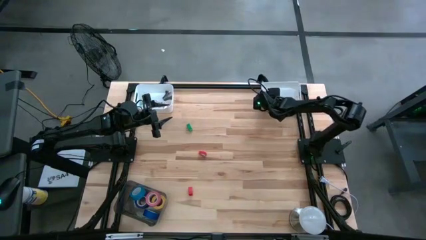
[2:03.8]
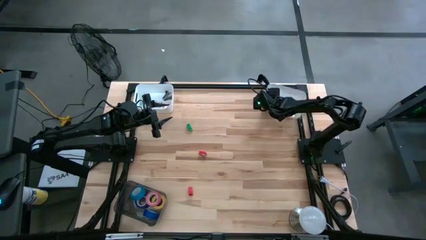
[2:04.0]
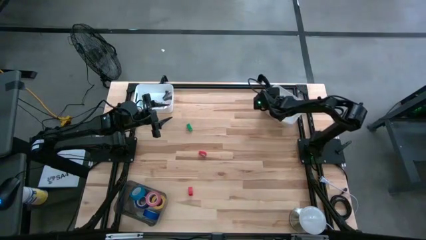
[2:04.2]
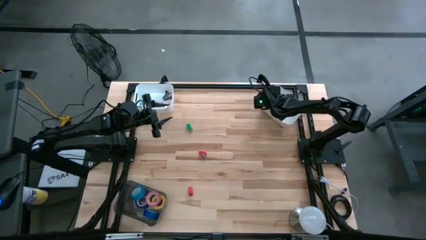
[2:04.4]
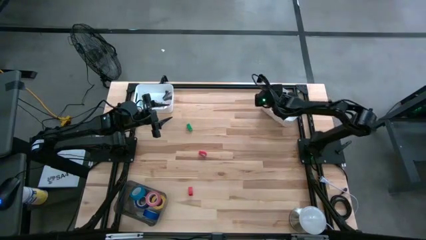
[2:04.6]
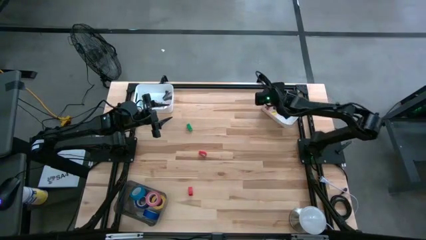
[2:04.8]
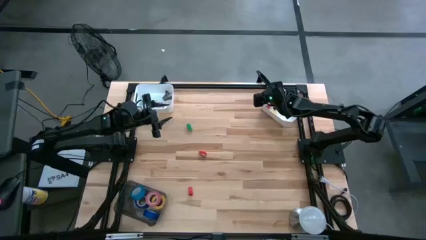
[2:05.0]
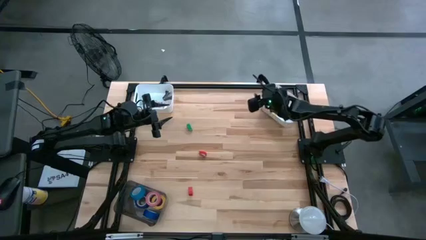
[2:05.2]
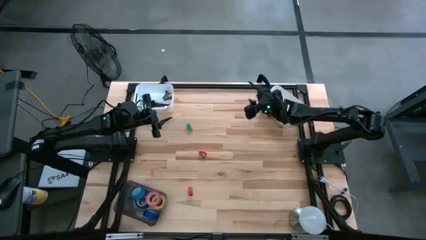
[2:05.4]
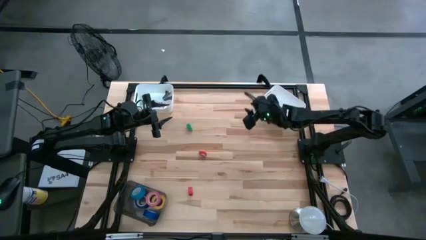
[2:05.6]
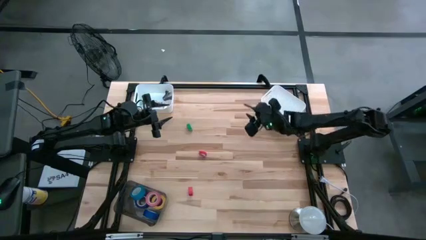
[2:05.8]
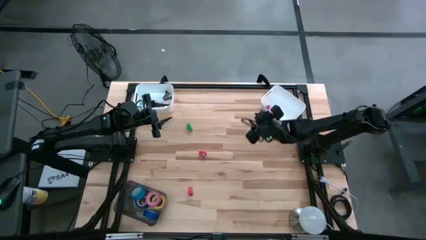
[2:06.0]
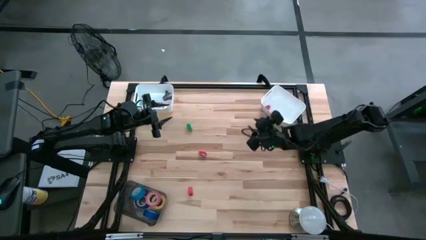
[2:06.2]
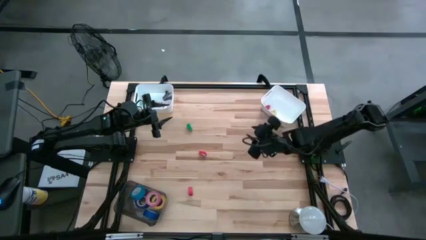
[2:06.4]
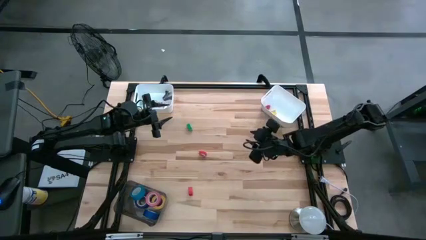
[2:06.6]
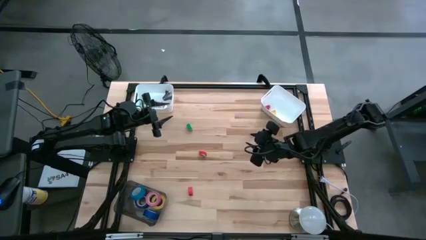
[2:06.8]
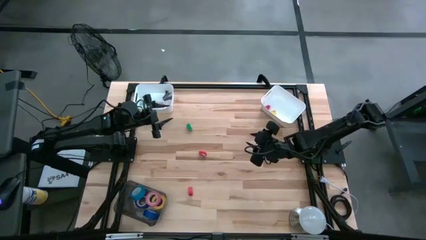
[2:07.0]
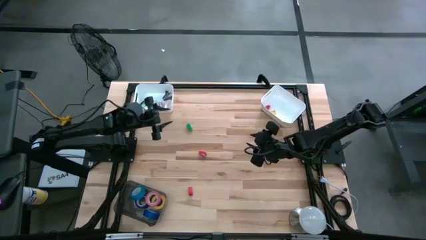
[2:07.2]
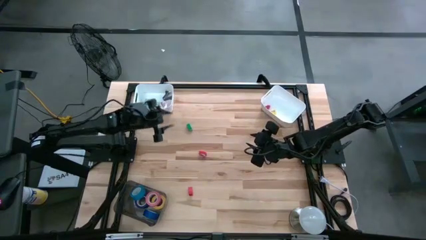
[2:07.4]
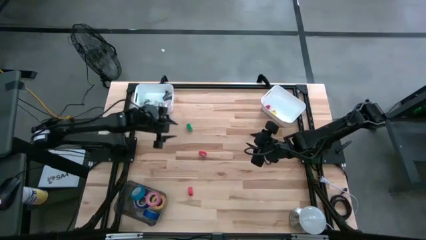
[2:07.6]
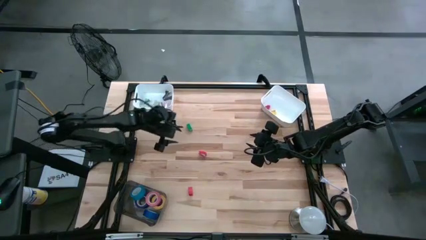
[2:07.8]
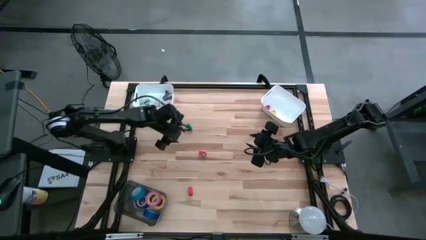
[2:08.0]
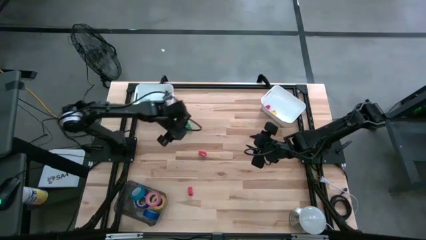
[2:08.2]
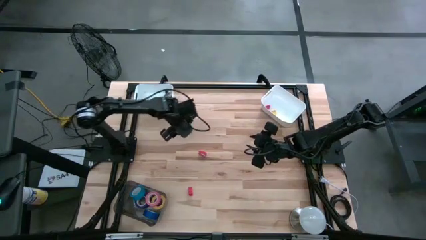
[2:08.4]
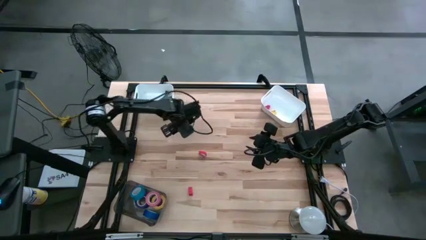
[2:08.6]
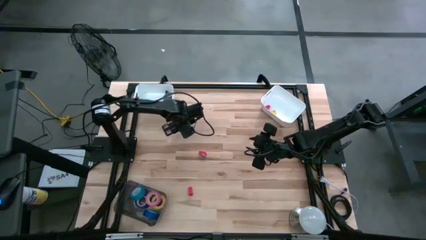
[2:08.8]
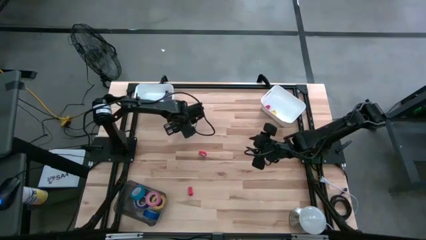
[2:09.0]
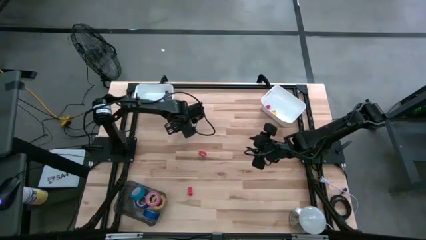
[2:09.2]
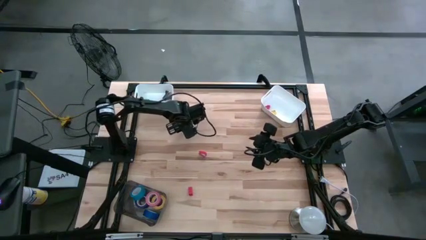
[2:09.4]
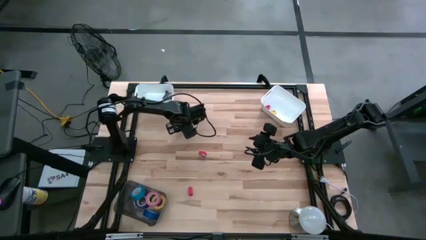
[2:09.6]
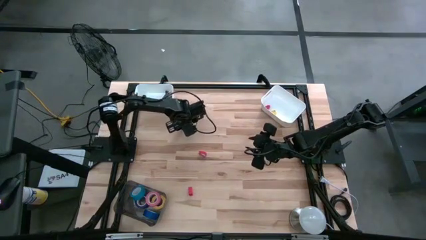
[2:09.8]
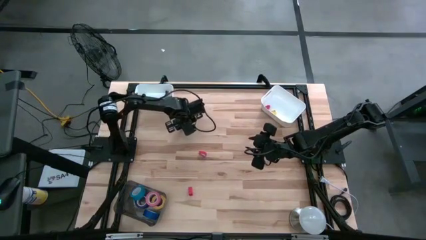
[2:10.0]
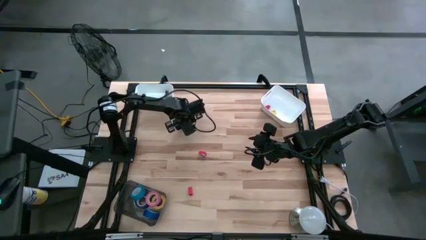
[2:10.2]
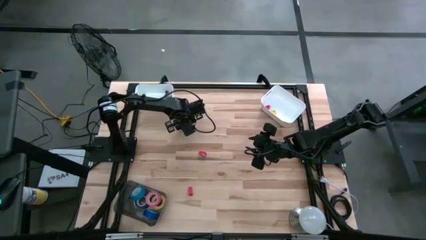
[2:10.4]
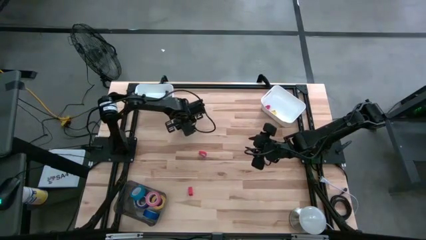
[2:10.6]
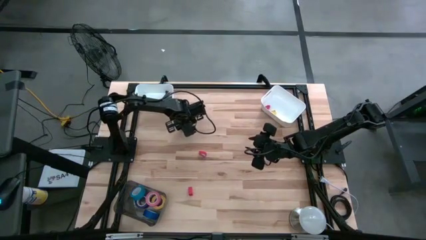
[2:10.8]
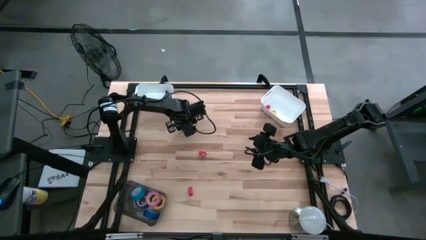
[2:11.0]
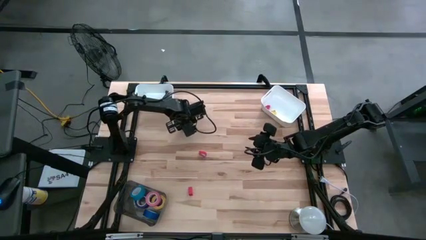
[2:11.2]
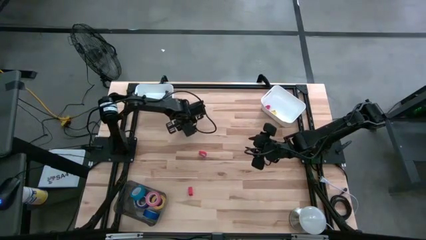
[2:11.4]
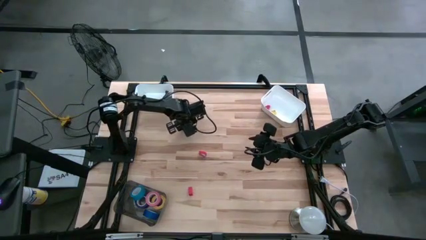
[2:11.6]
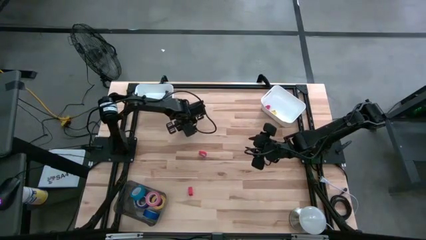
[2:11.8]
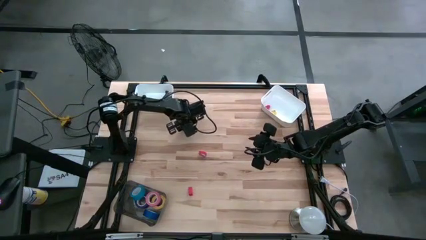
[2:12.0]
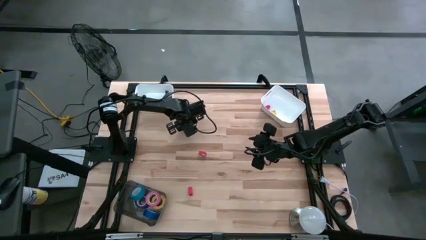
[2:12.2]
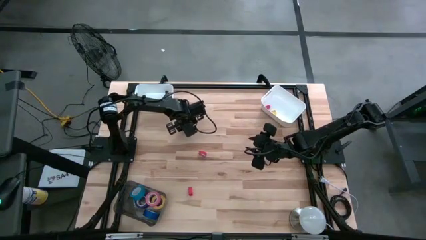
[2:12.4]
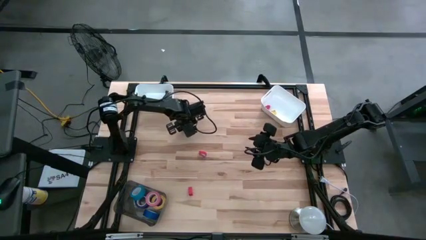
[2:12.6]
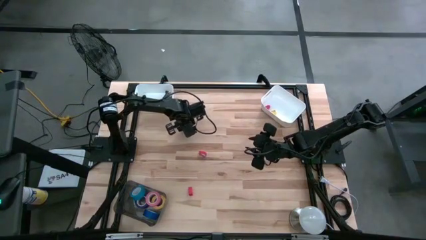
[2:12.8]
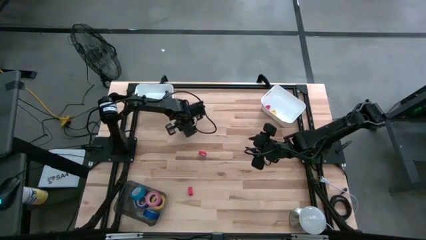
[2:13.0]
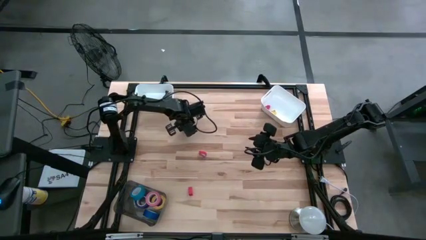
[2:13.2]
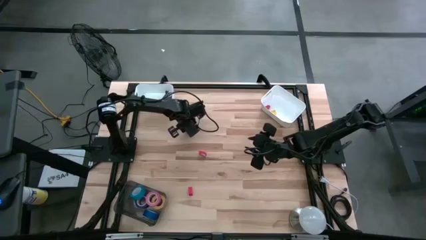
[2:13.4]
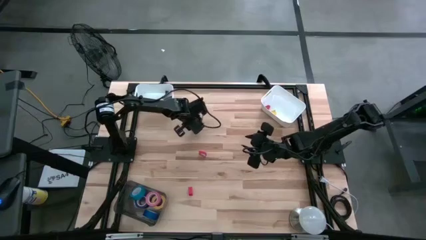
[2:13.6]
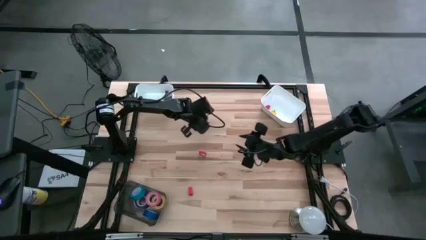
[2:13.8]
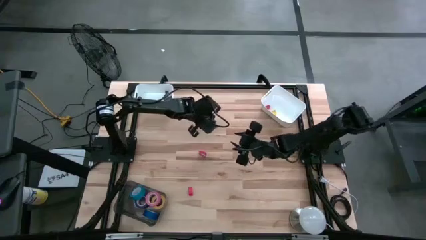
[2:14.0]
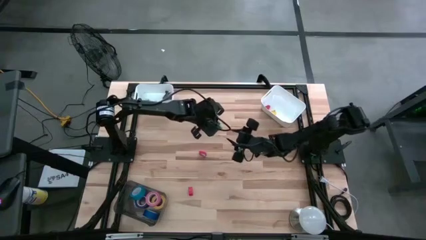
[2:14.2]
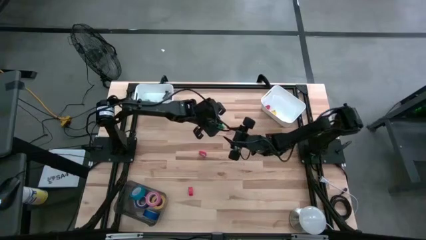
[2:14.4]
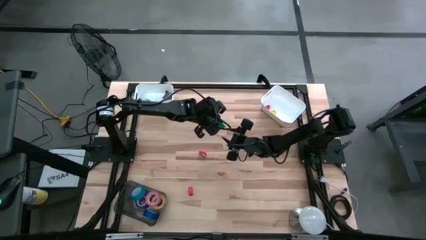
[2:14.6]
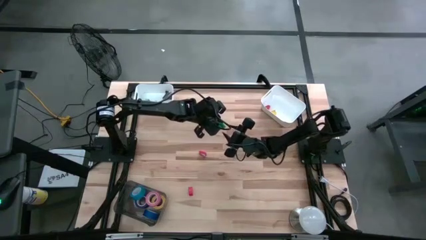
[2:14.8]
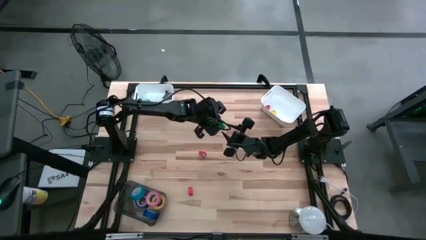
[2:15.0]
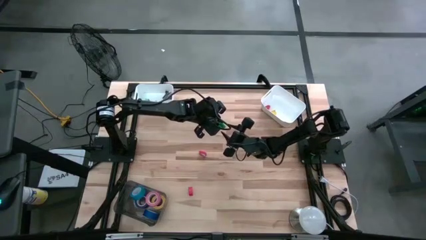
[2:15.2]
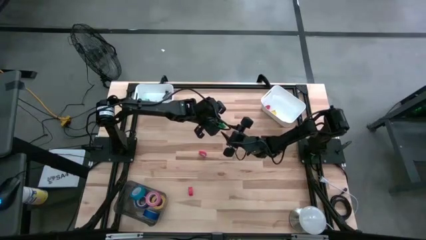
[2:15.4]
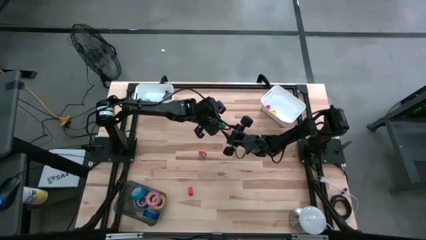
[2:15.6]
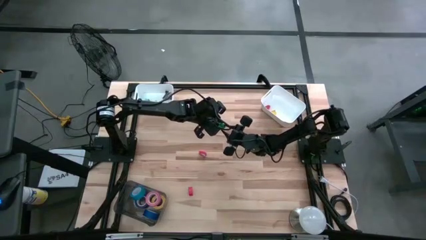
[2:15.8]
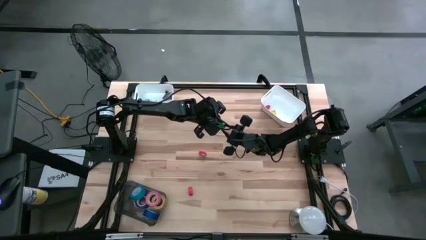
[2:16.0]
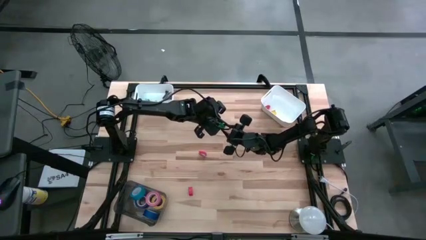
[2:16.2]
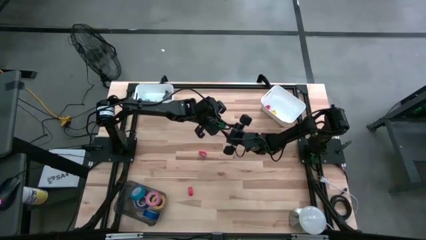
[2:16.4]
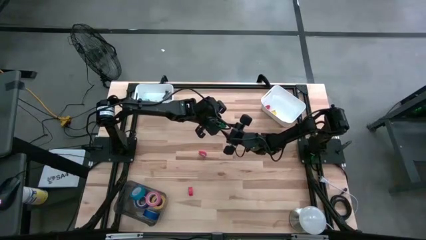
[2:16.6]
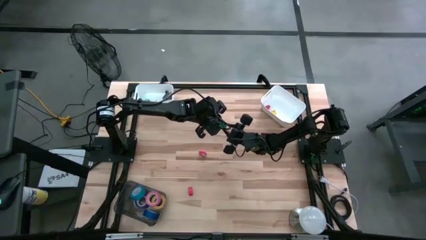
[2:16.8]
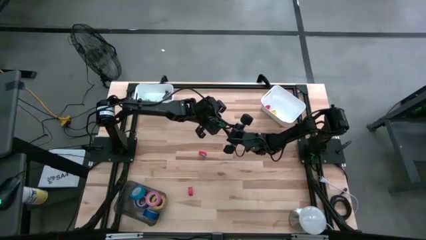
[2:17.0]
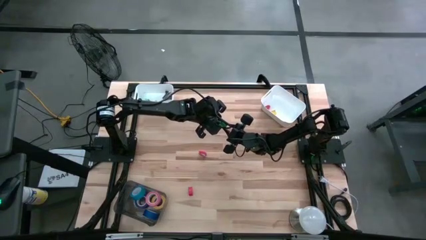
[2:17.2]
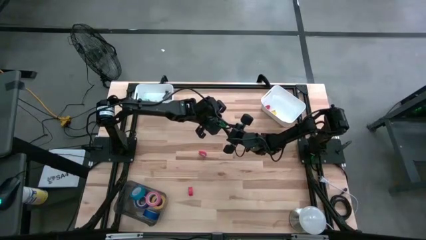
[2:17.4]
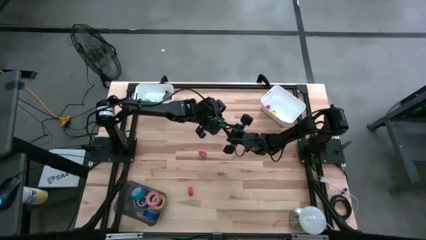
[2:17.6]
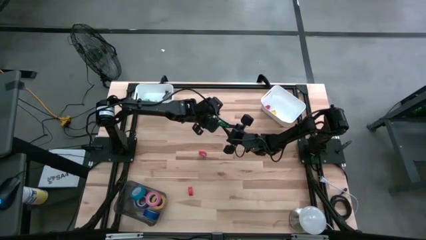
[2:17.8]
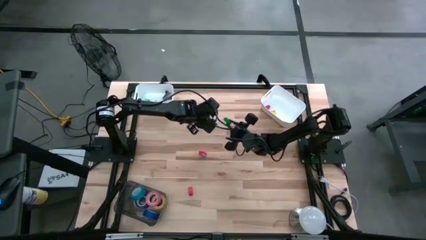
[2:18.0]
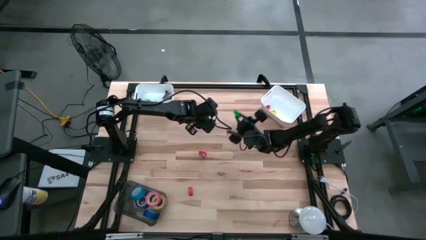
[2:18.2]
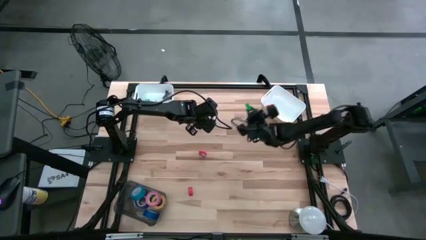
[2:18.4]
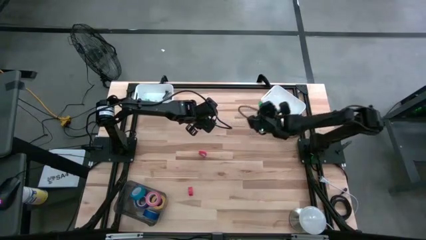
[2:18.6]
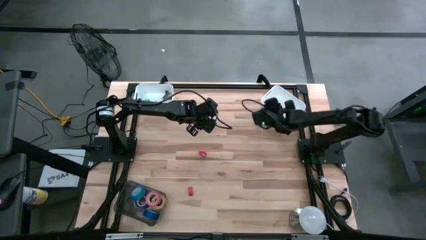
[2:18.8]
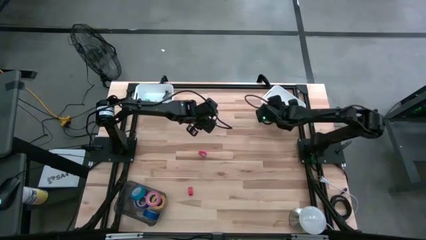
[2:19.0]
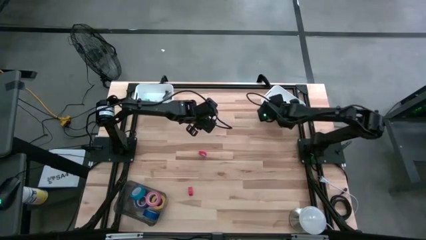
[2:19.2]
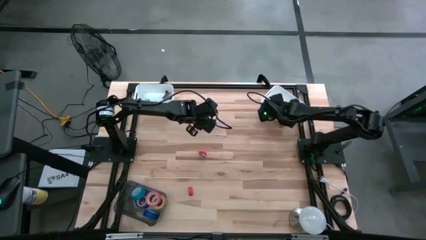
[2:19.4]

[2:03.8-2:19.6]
Task: Pick and place Stapler, Stapler remover, tape
Put the green stapler into the right white bin
